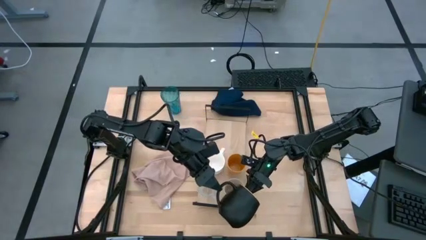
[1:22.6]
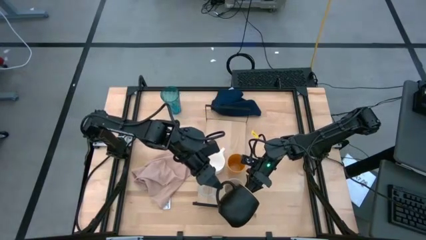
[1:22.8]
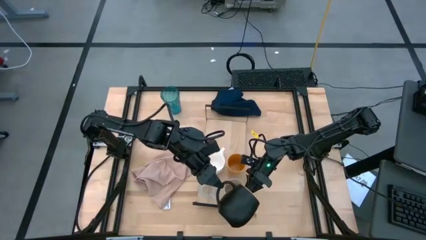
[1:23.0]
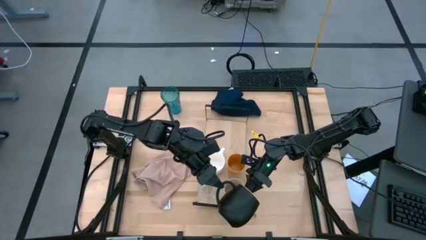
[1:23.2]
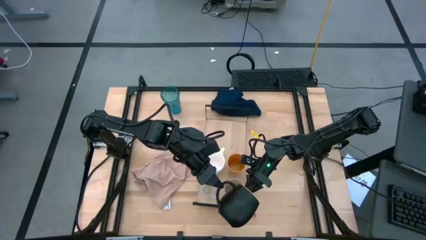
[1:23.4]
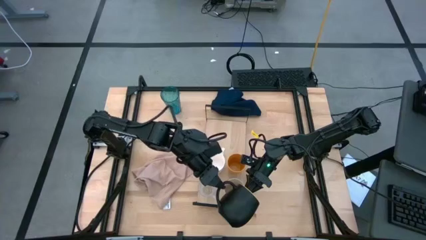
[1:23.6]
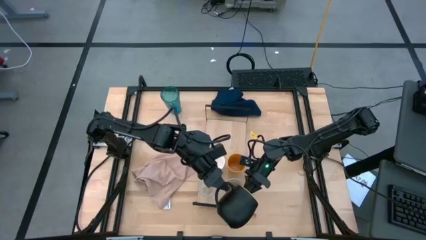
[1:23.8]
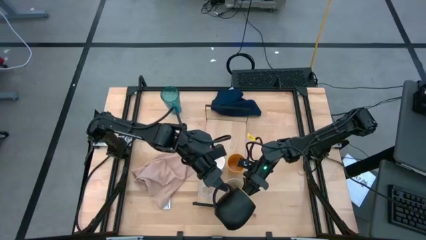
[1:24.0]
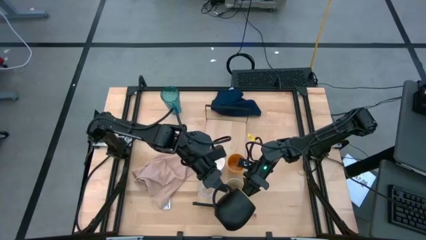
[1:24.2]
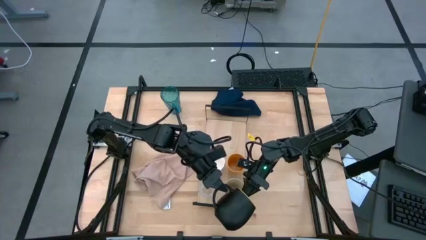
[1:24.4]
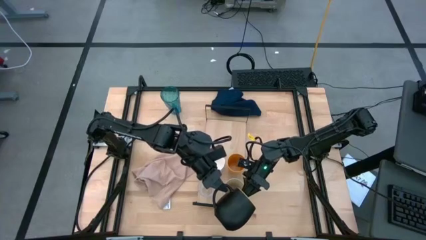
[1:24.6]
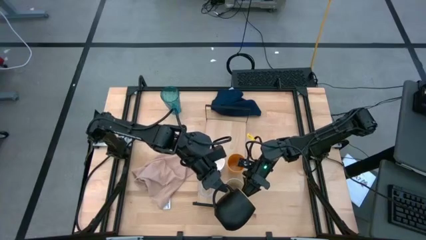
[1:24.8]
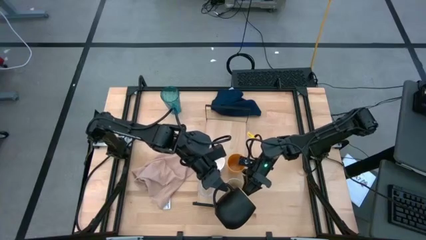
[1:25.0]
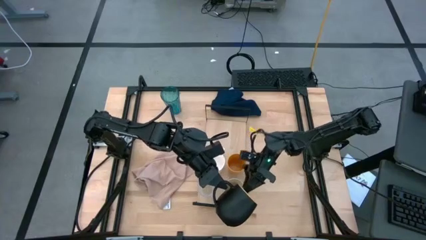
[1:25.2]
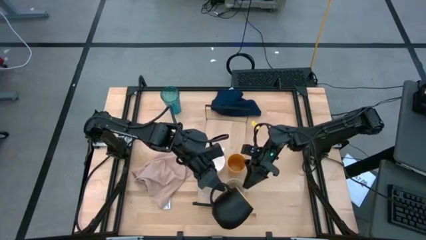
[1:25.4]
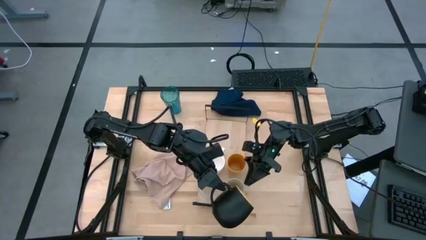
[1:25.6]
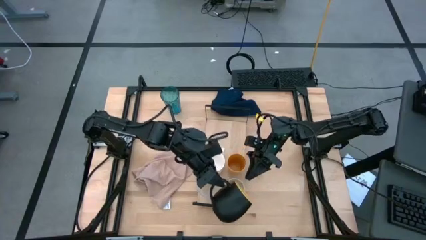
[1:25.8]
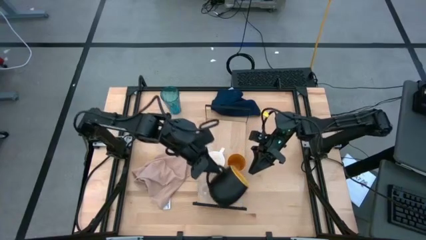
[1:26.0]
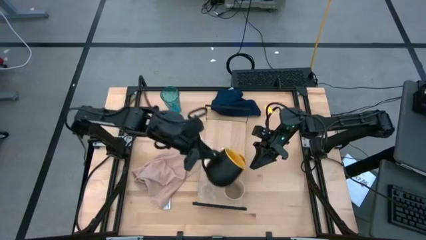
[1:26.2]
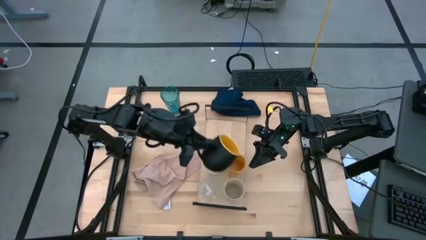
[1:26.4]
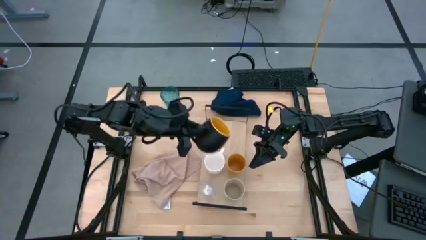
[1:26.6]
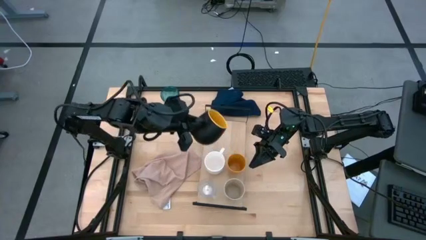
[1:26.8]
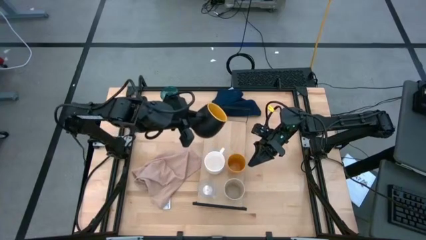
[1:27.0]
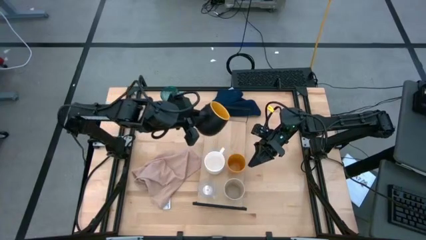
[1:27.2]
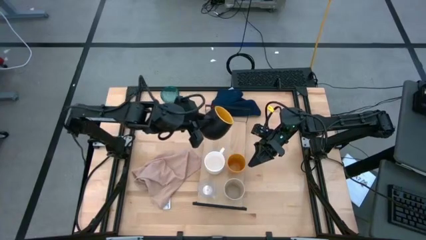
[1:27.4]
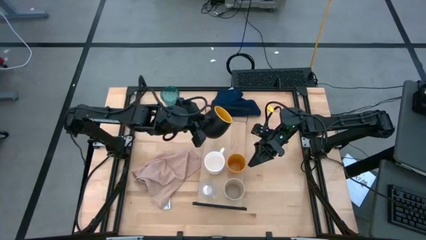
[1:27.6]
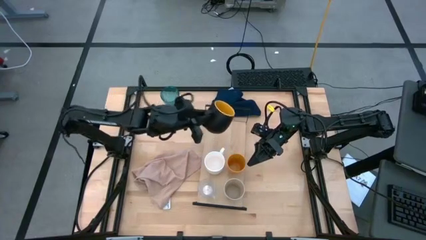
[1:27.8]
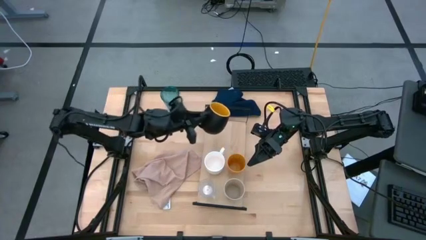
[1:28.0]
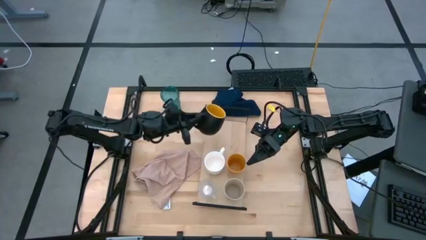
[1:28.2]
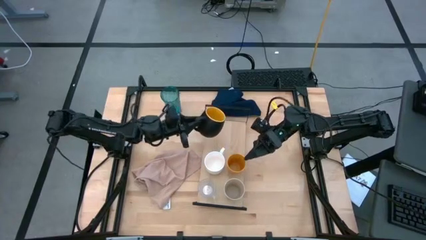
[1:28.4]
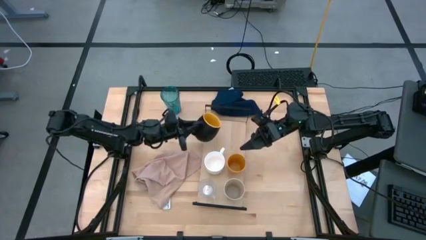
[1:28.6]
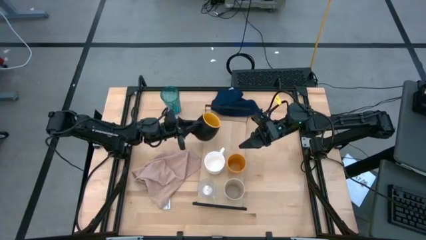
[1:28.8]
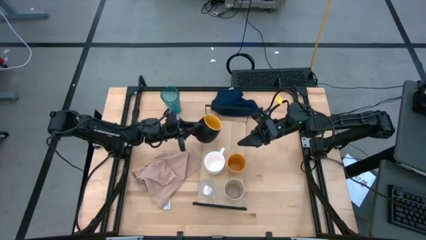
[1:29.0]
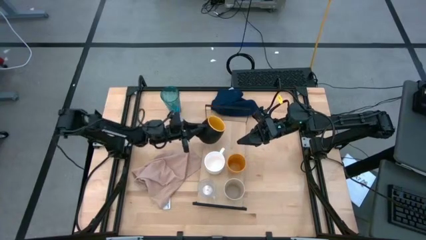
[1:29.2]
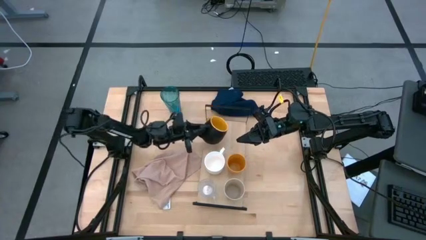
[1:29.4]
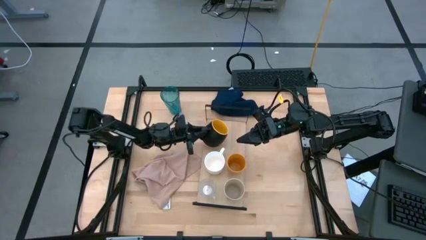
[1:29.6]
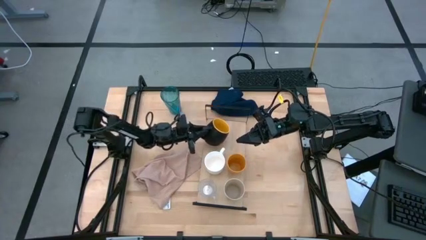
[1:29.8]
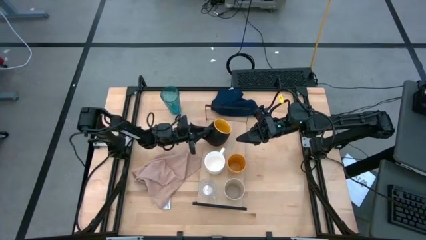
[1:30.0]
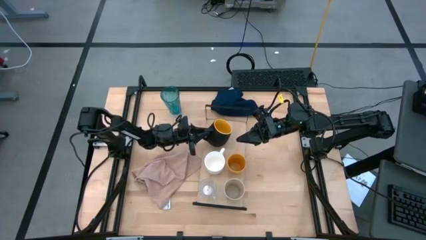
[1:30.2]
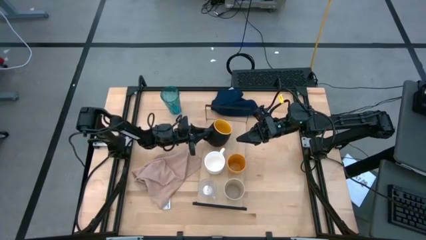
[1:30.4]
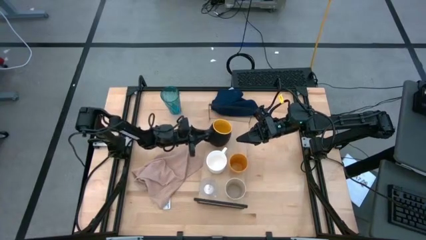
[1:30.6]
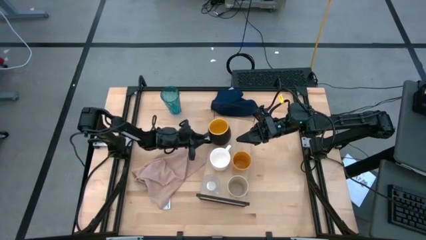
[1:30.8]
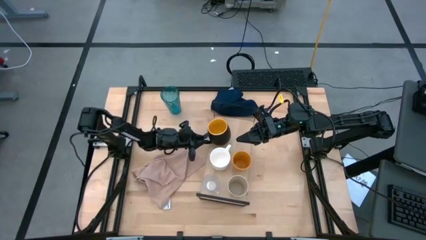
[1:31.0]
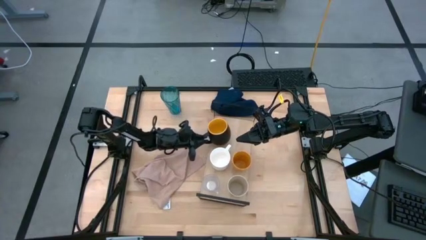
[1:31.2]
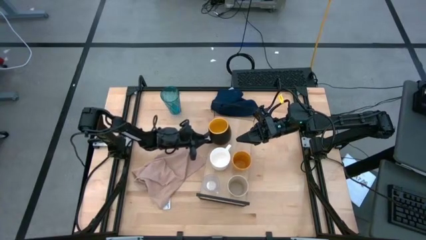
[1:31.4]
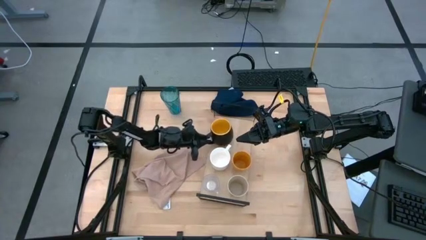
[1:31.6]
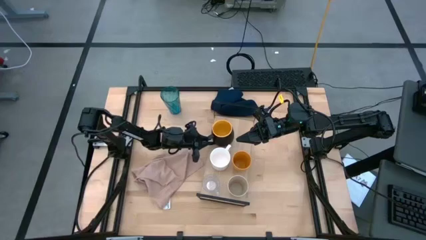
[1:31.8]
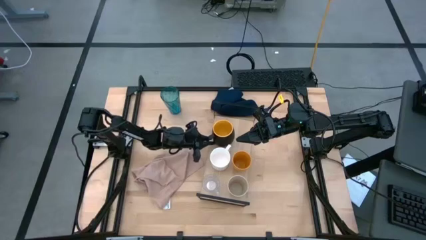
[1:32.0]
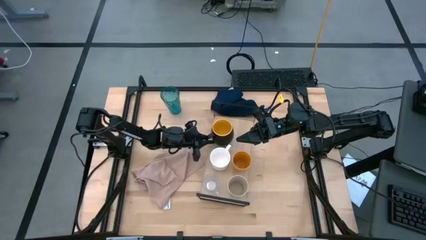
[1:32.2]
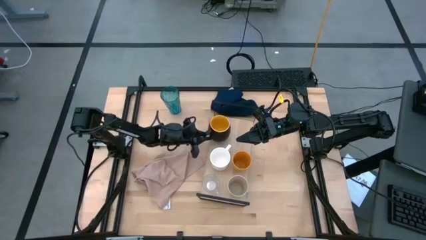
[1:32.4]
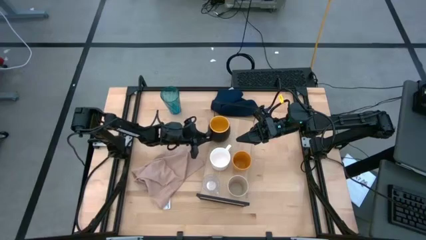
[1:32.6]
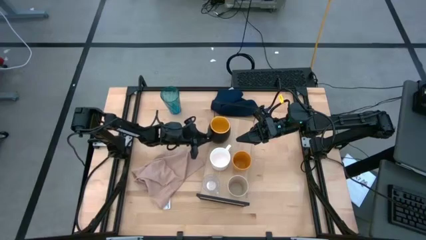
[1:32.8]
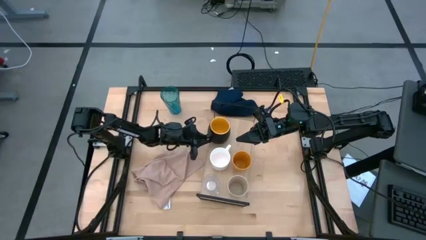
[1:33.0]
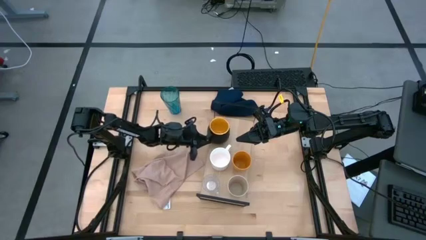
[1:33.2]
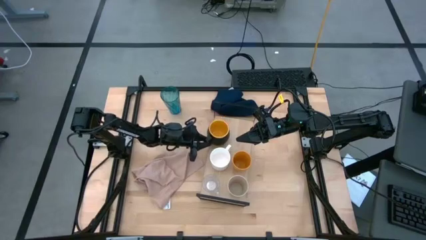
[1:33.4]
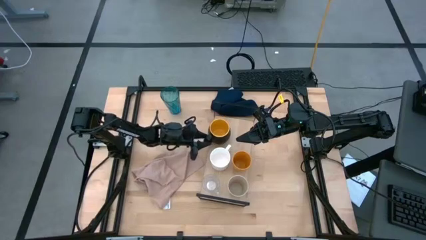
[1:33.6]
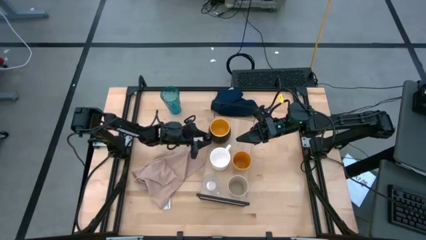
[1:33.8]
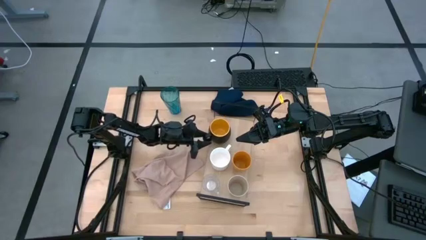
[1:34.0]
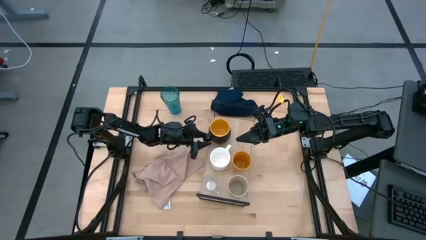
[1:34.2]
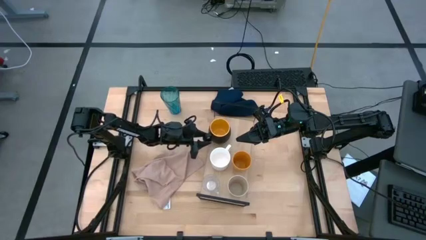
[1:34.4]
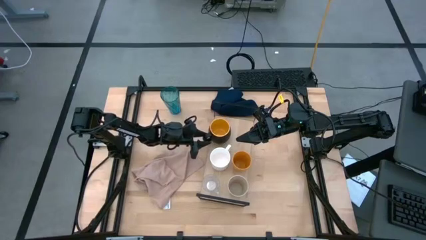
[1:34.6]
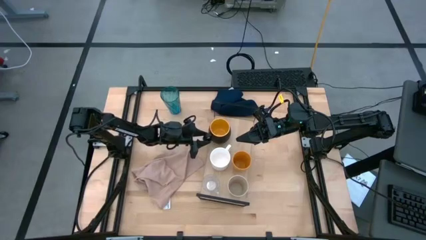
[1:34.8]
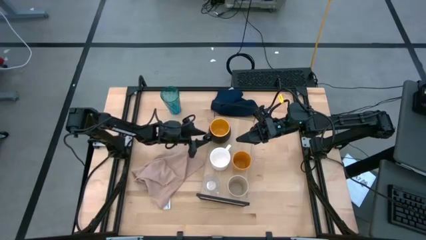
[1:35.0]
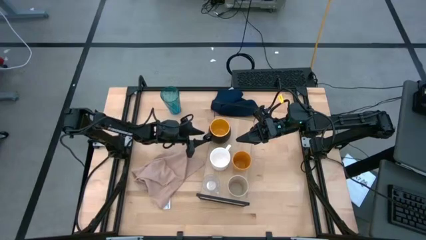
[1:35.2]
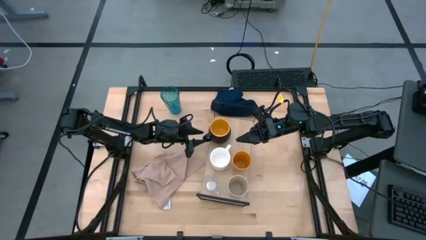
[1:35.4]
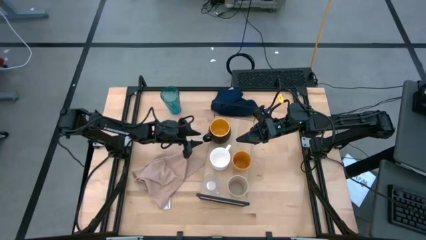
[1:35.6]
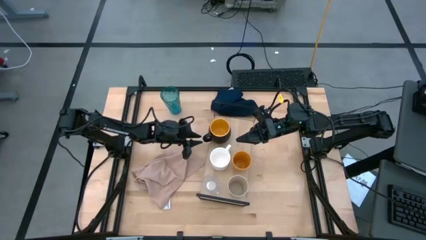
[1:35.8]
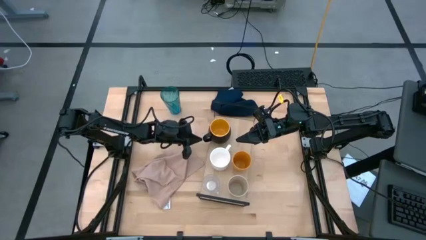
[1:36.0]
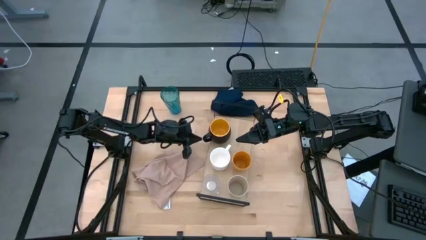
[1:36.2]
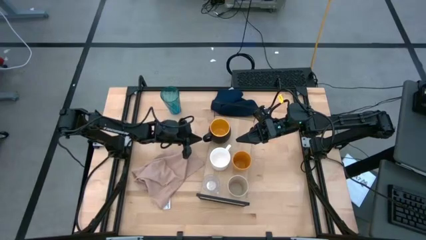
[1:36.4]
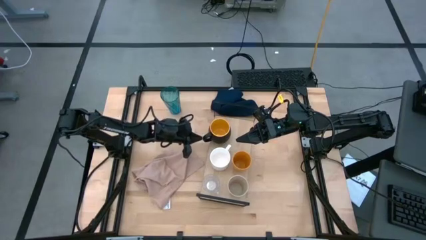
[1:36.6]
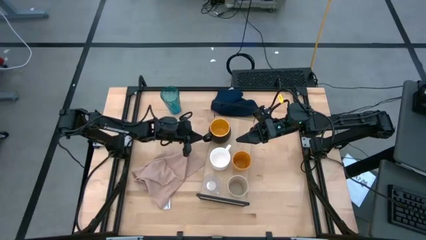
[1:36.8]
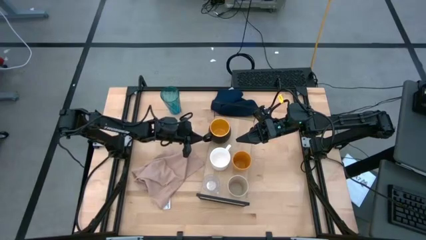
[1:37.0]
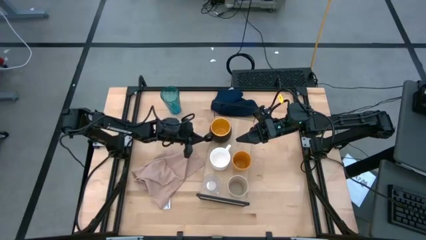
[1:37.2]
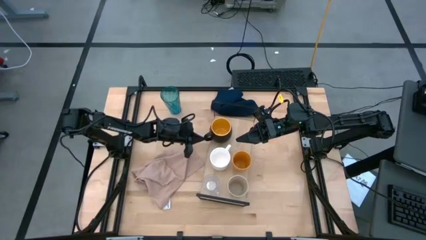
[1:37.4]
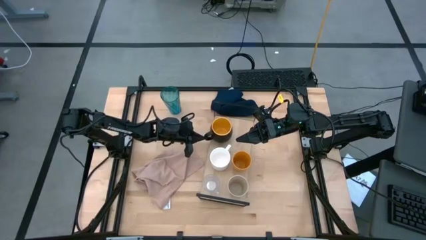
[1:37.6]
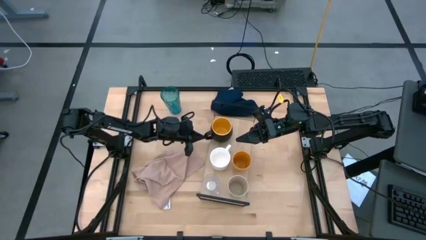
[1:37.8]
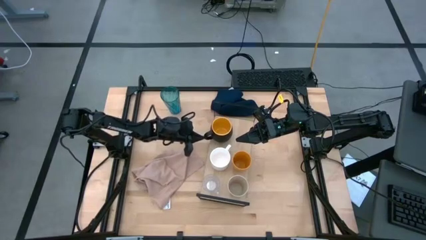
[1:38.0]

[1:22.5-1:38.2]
Task: Stack small to large cups/mugs on shelf
Put the black cup on the shelf aligned with the white cup

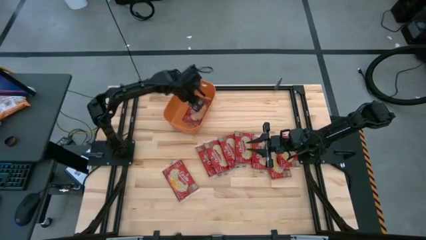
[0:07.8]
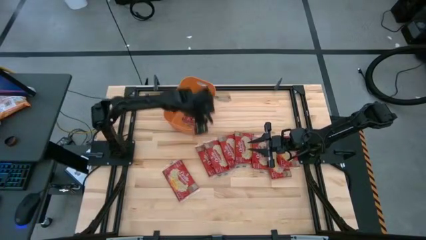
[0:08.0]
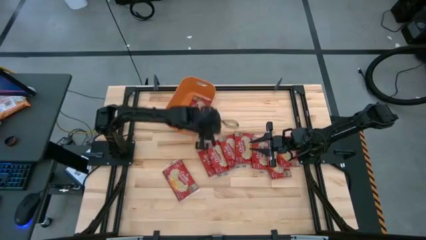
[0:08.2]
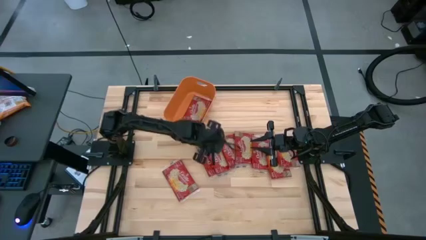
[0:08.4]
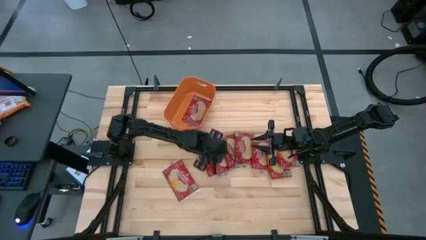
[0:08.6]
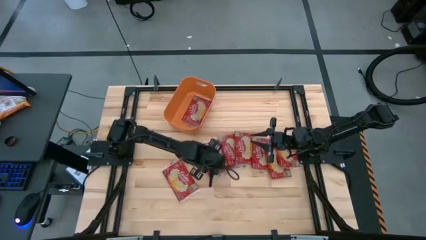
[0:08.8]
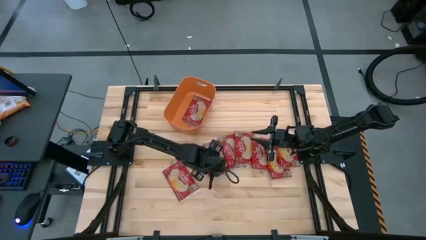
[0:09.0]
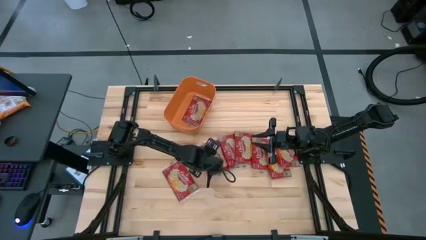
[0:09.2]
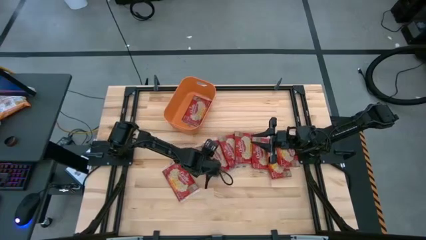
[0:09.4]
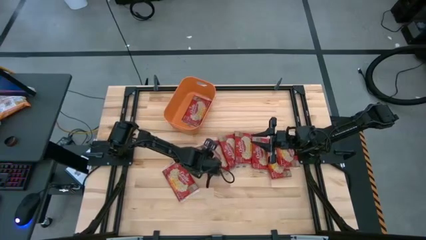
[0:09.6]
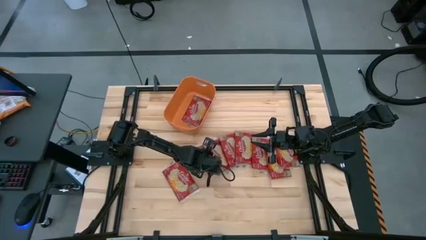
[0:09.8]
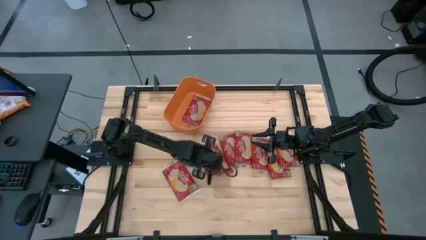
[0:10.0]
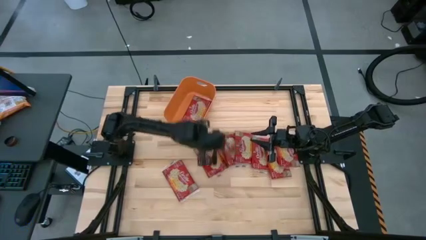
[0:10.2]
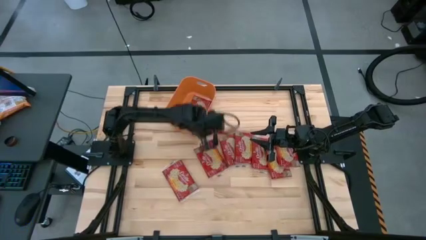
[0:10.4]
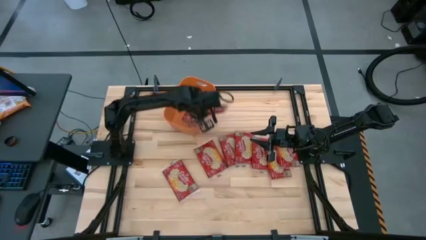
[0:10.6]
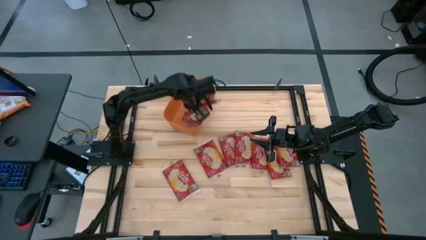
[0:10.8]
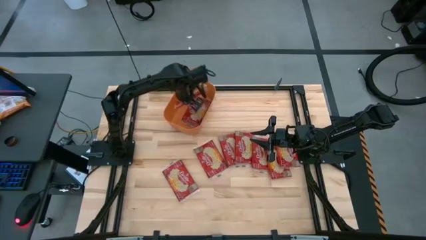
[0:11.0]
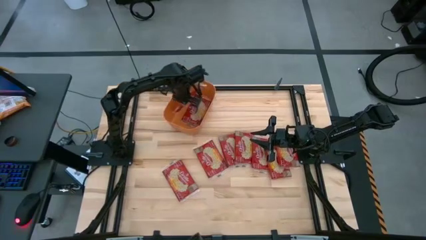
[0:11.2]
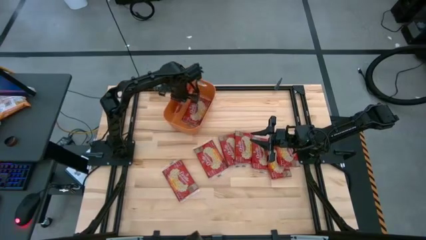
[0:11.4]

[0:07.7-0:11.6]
Task: Sort popcorn bags into baskets
Put the red popcorn bag into the orange bin
